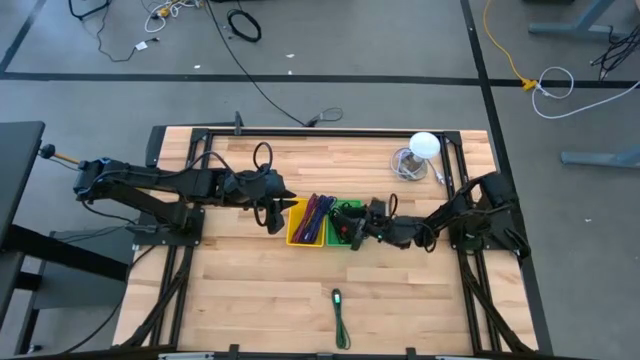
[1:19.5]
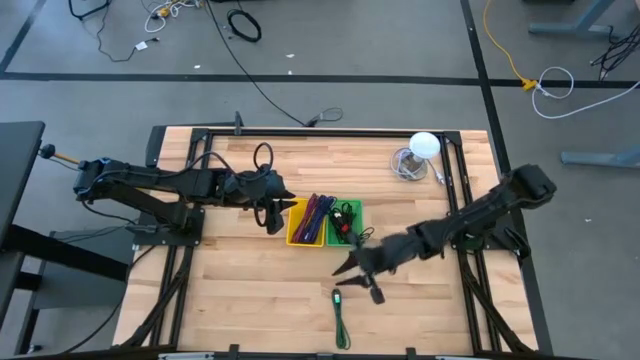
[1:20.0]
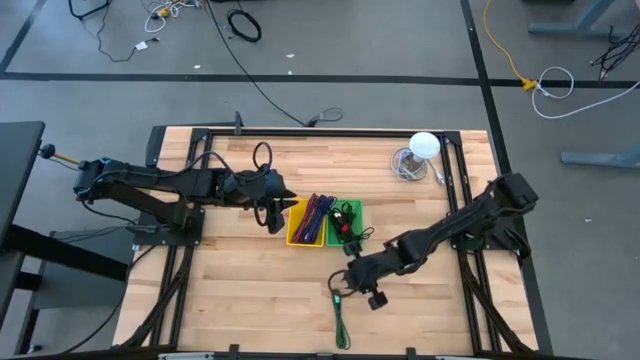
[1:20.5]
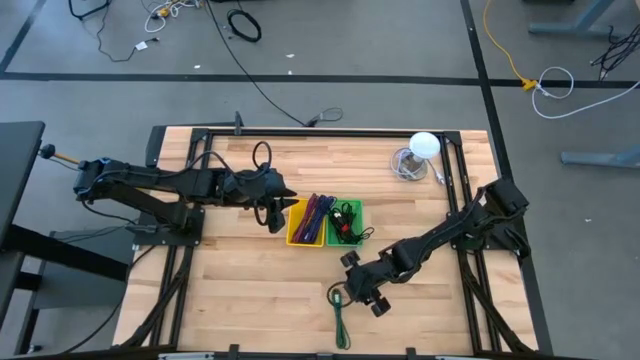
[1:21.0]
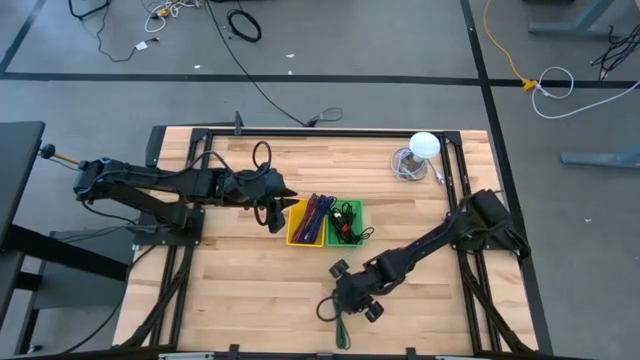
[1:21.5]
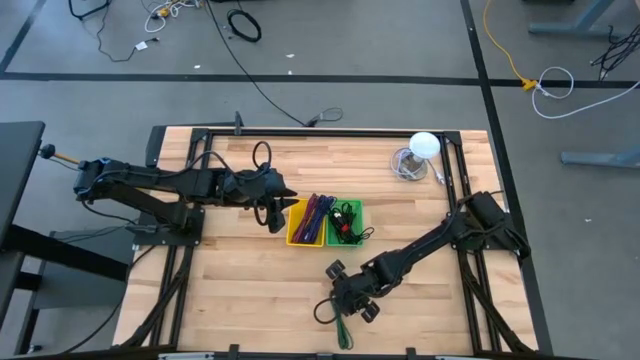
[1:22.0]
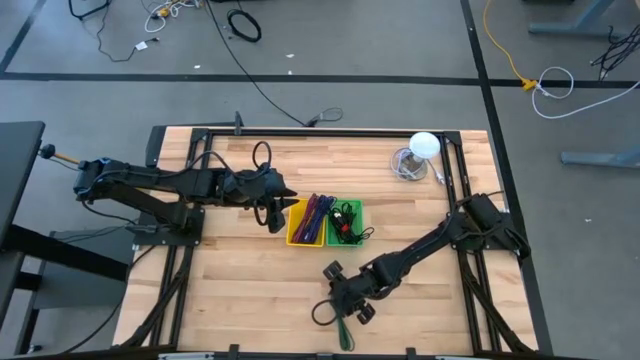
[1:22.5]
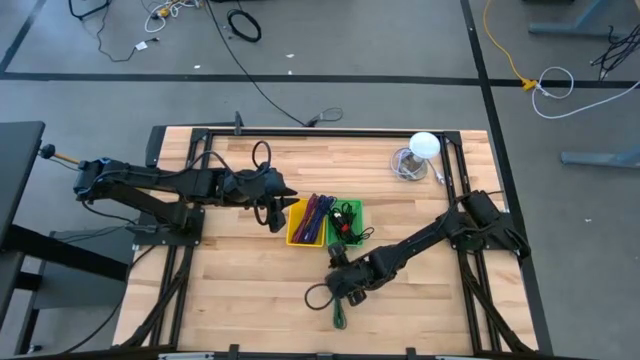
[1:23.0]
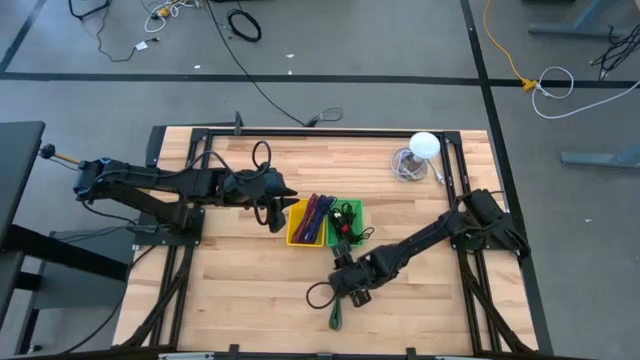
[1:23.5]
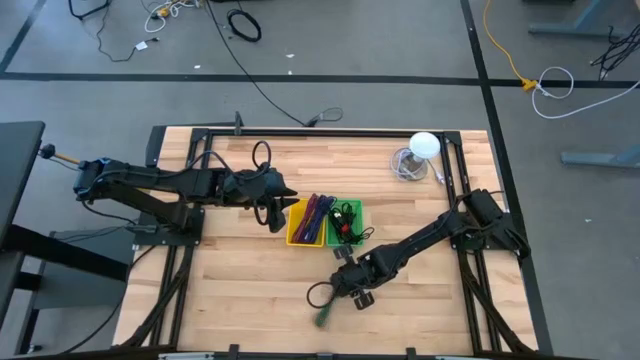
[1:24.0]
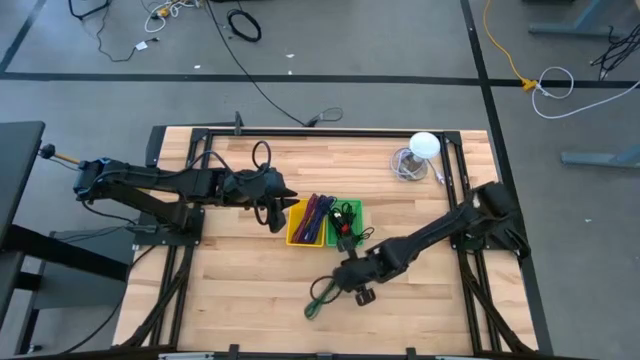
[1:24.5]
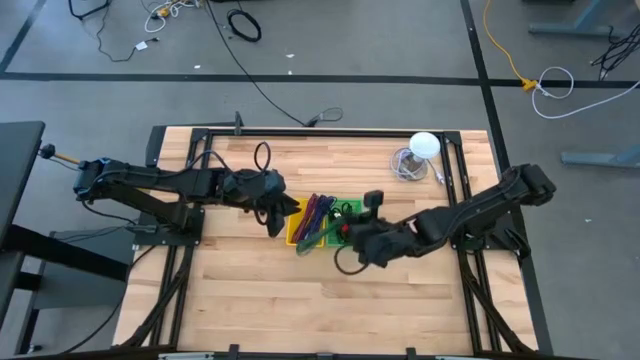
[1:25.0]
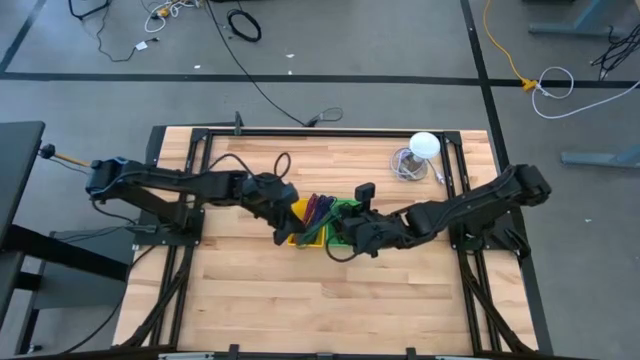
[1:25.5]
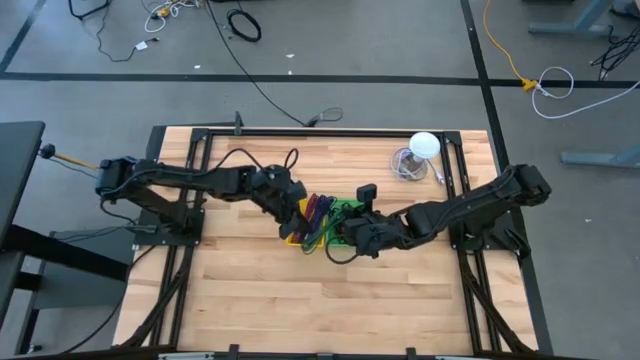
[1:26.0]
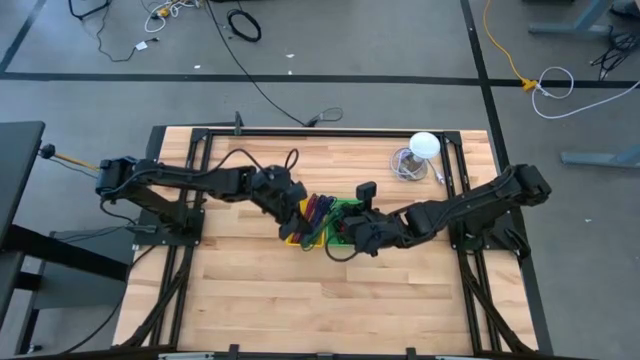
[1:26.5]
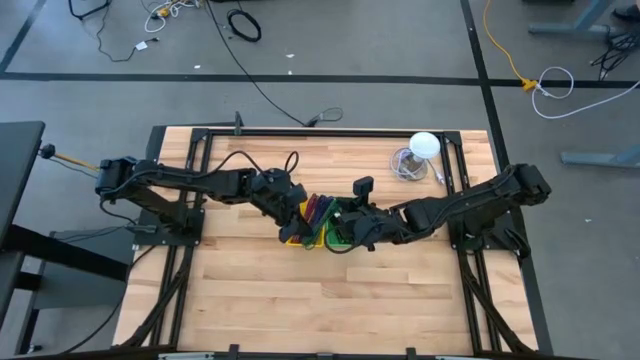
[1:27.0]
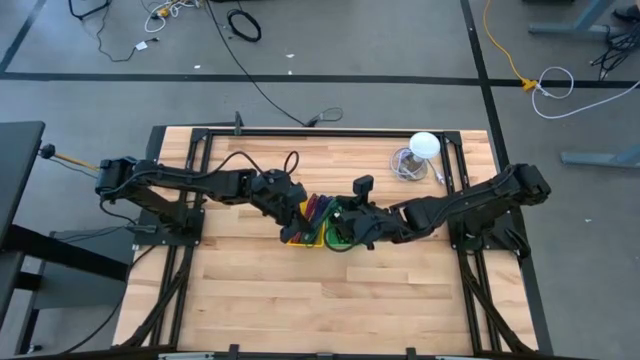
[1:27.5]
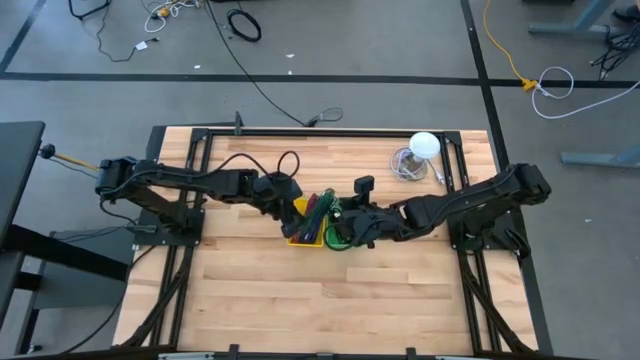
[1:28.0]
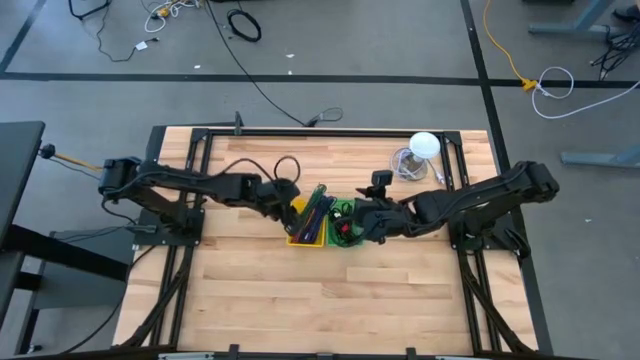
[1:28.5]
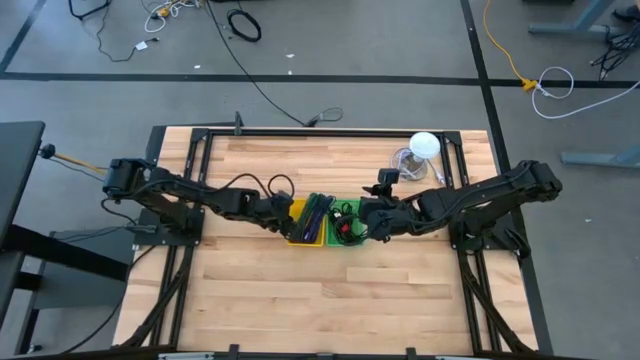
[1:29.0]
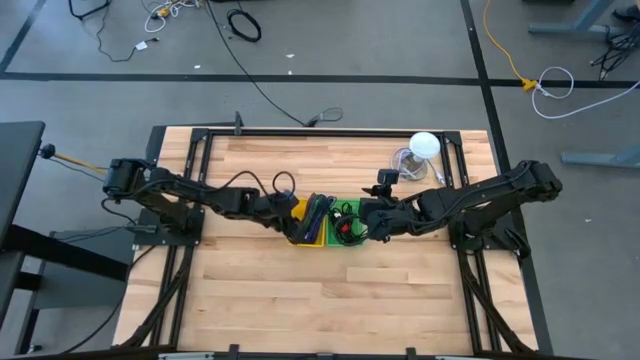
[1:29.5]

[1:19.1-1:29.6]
Task: Pick & Place USB Port
Put the green charger cable into the yellow basket

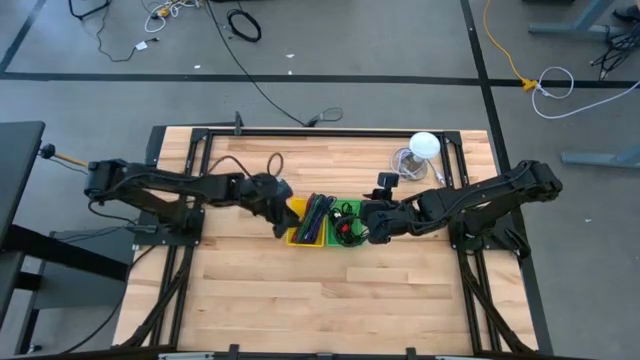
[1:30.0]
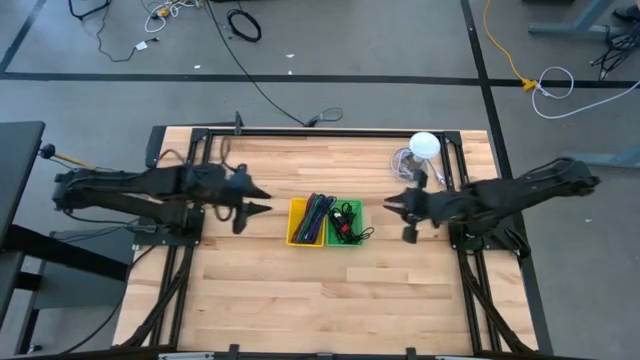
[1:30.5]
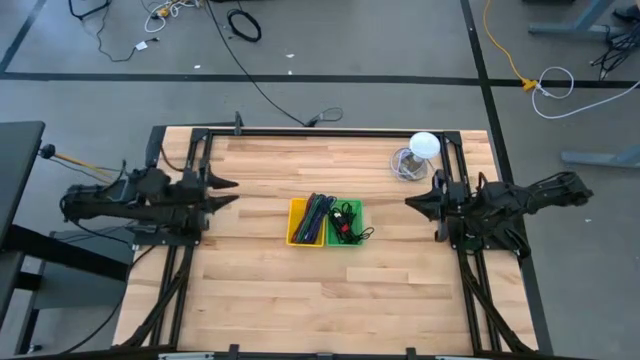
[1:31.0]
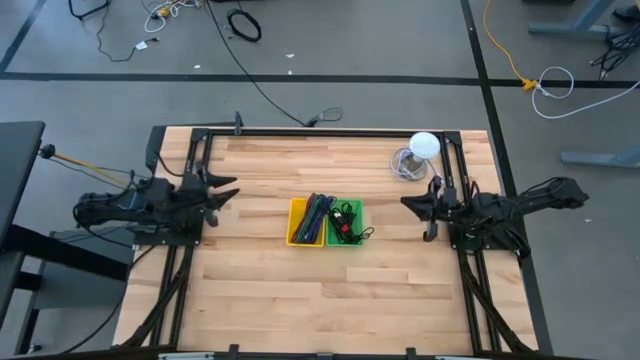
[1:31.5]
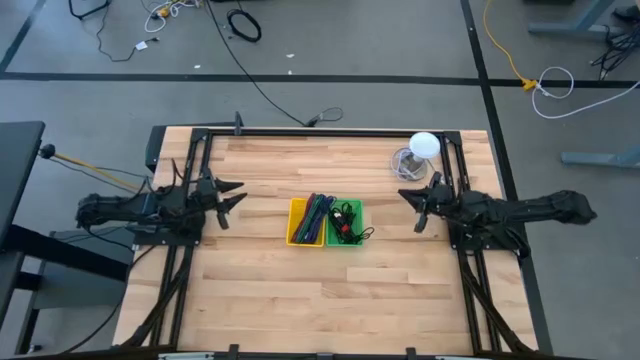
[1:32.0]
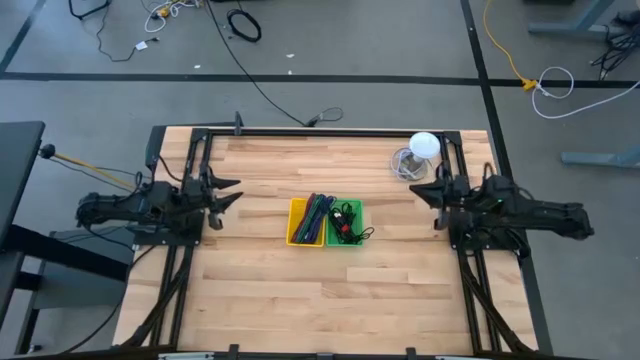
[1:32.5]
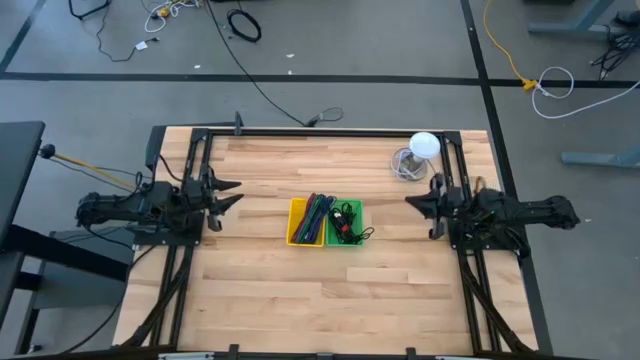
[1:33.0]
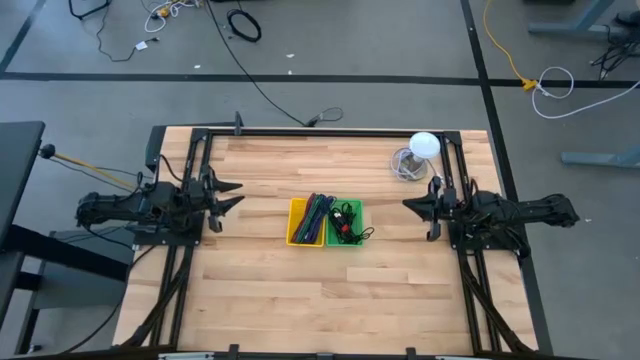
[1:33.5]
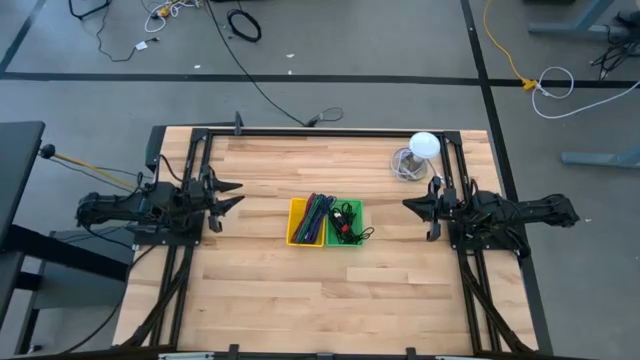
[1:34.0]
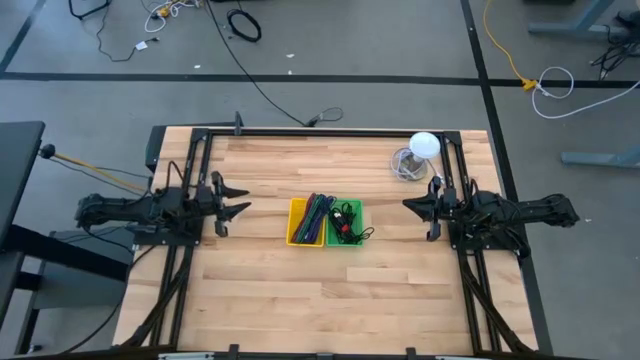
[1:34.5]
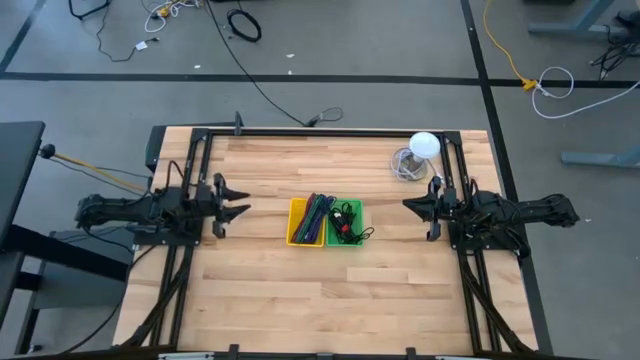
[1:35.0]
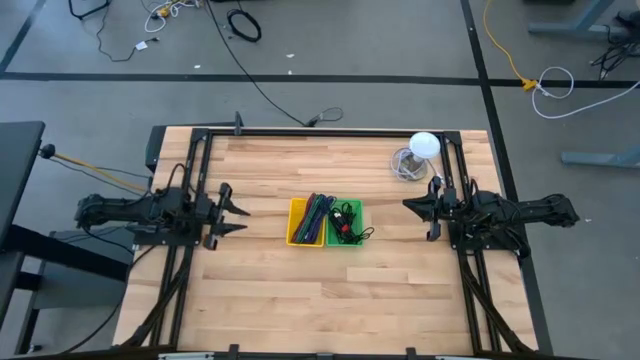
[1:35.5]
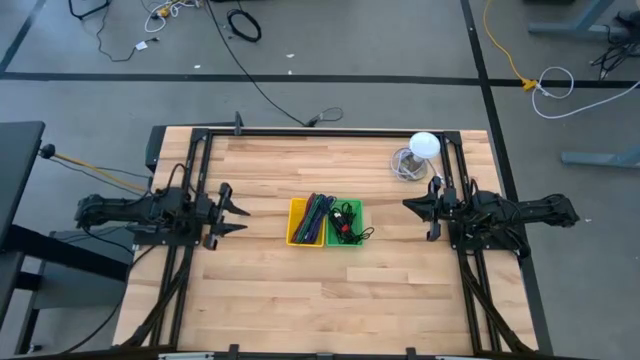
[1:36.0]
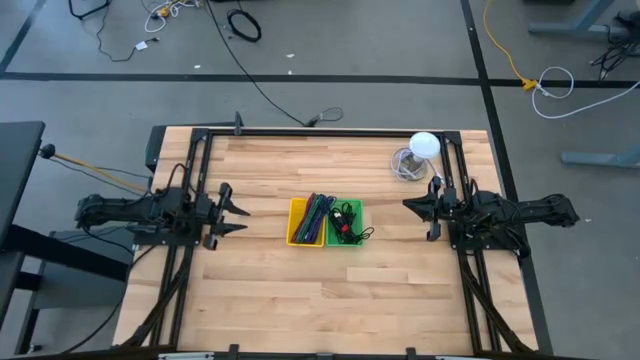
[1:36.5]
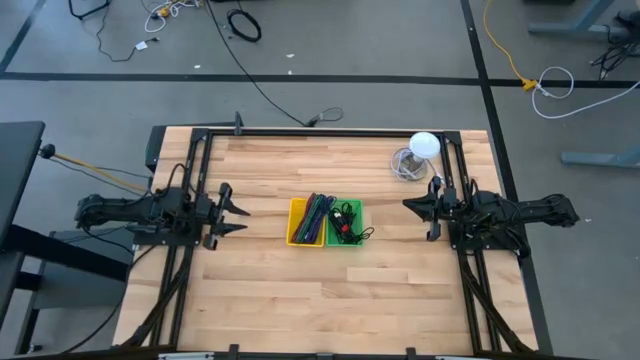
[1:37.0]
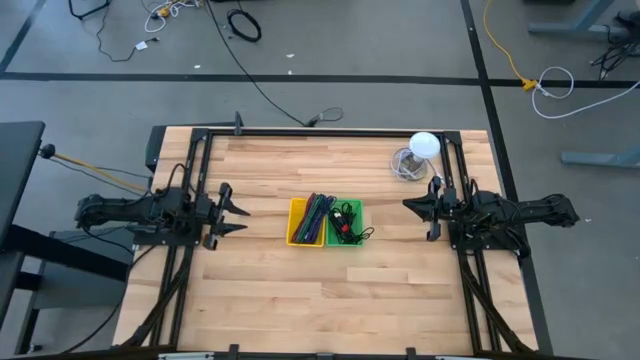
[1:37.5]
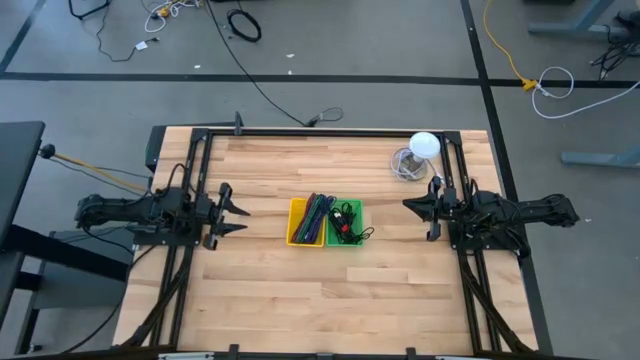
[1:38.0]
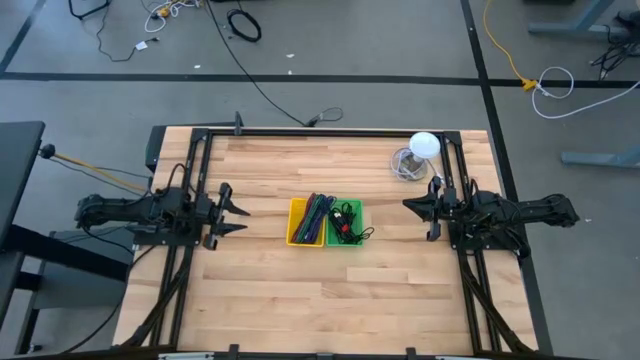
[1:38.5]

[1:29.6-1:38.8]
Return to Home Position
